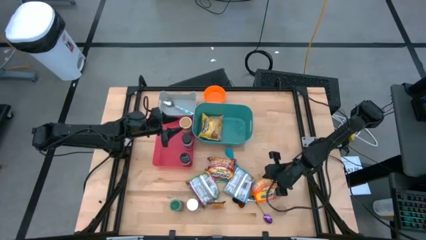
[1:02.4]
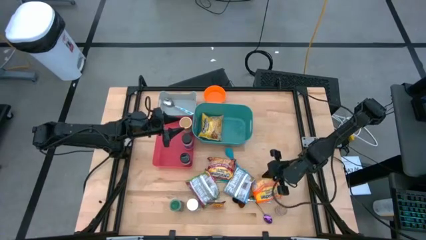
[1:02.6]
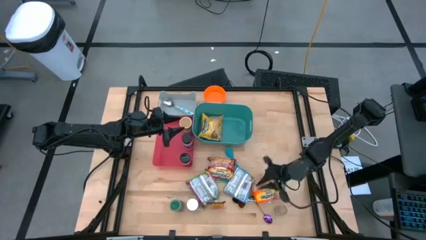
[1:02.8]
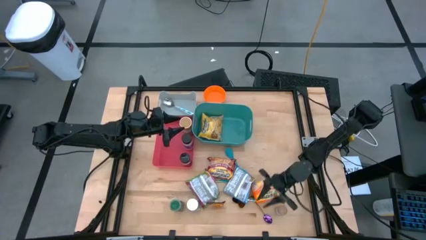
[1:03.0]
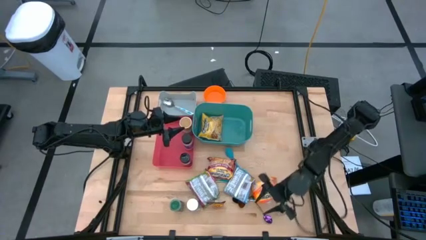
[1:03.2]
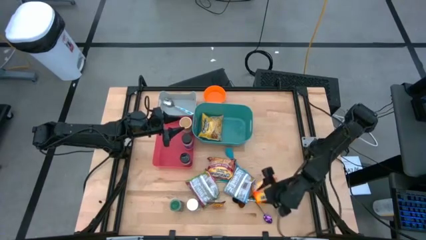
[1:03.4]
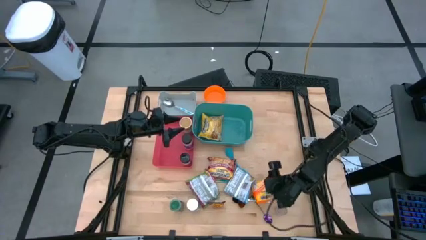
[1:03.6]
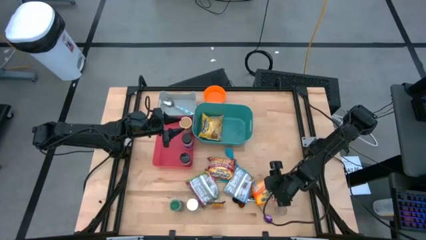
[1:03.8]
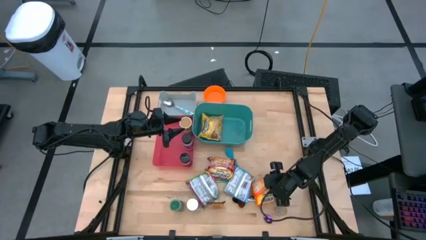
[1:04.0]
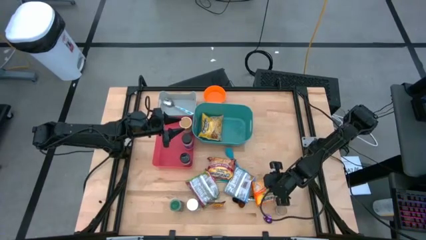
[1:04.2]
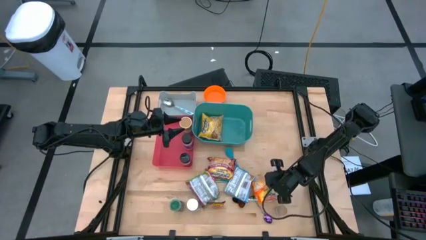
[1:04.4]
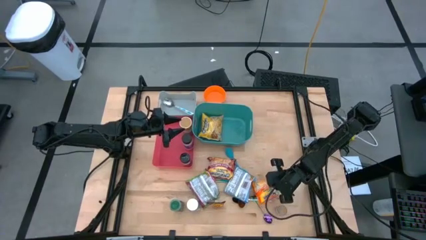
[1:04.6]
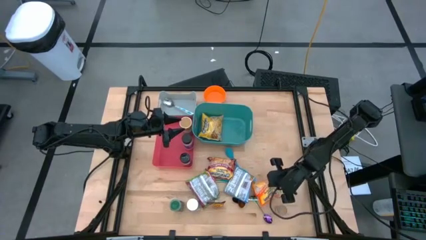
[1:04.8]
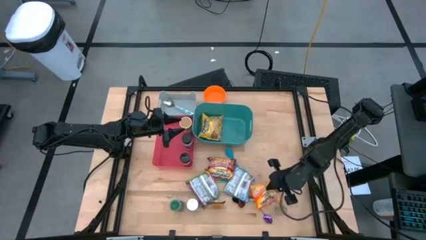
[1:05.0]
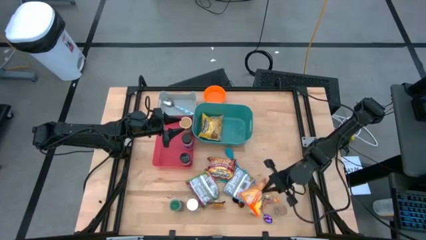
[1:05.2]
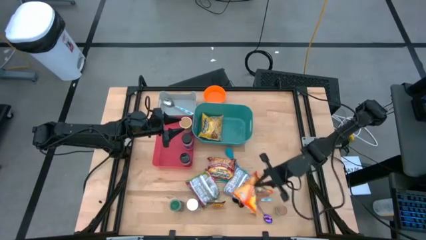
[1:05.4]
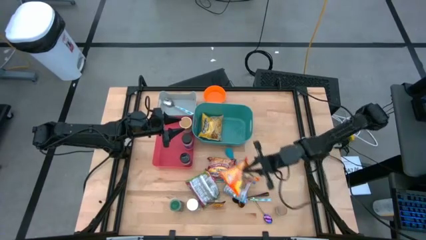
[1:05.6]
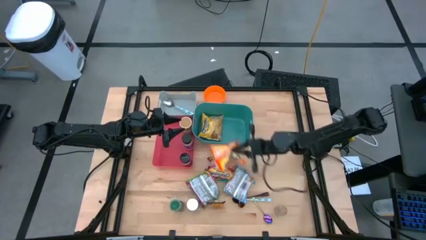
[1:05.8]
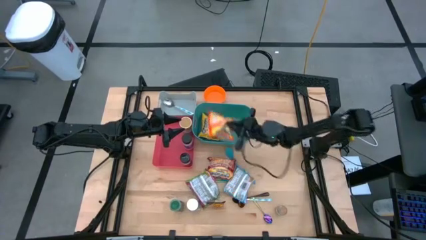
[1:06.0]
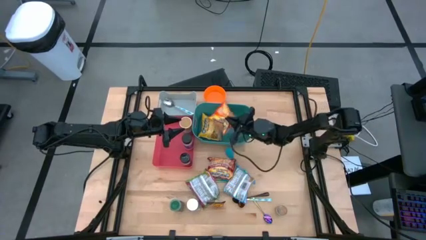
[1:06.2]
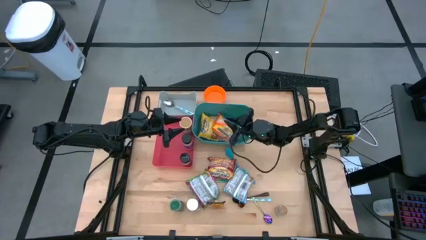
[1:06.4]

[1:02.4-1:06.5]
Task: Pick & Place Food Item
Put the orange noodle pack into the green bin

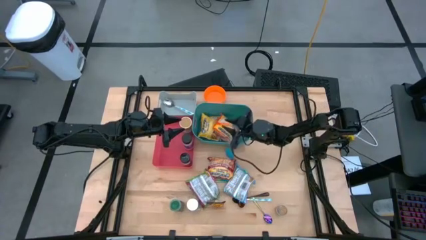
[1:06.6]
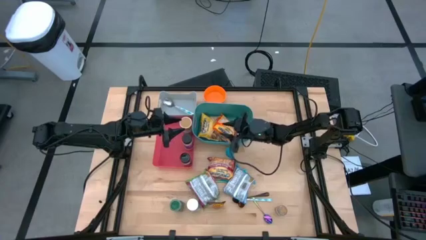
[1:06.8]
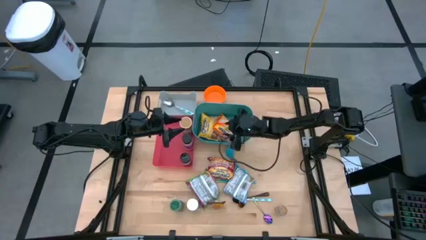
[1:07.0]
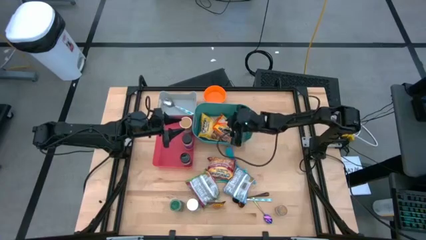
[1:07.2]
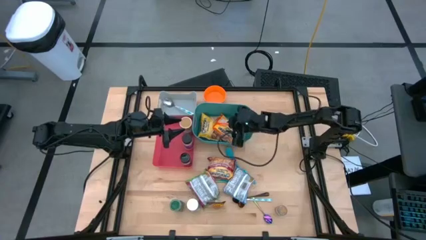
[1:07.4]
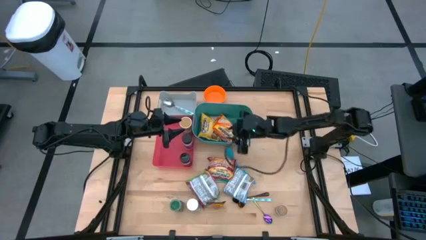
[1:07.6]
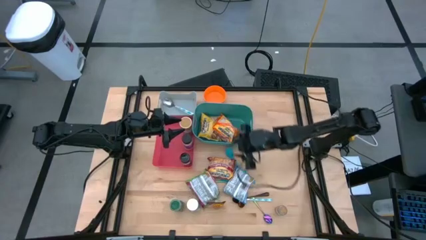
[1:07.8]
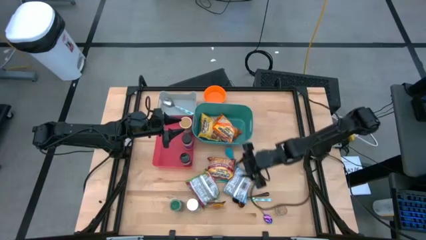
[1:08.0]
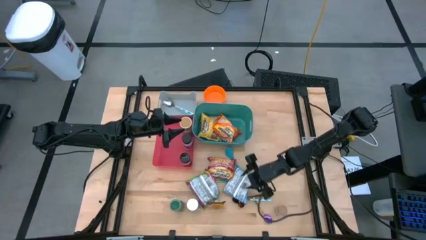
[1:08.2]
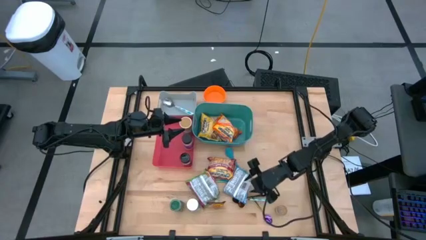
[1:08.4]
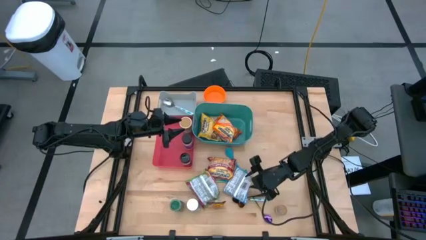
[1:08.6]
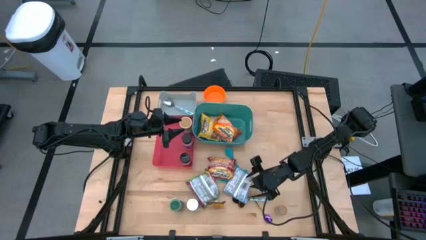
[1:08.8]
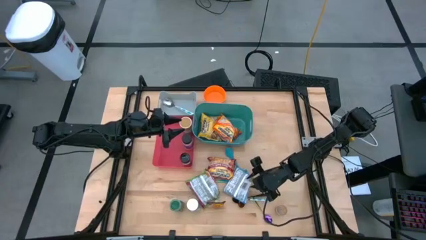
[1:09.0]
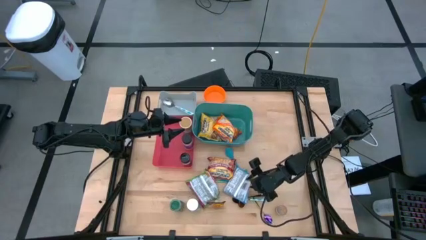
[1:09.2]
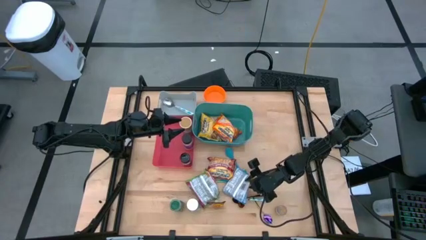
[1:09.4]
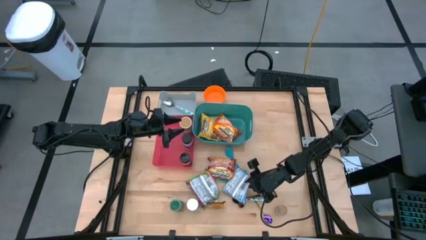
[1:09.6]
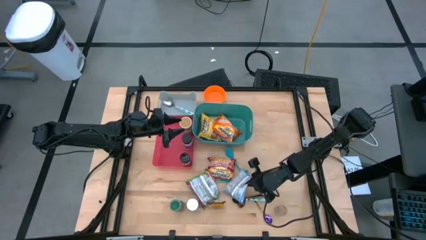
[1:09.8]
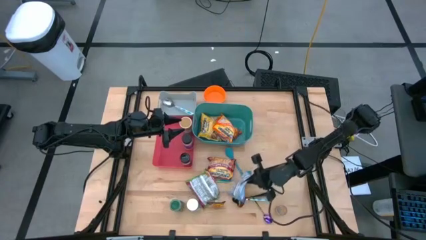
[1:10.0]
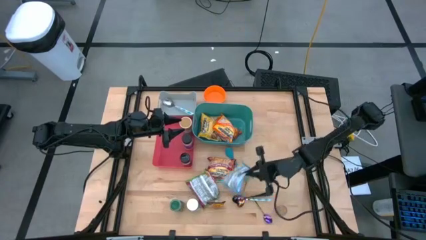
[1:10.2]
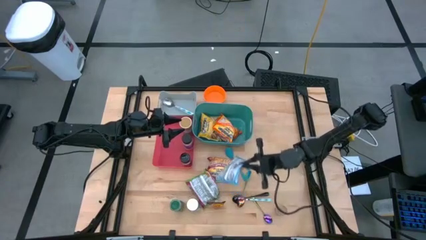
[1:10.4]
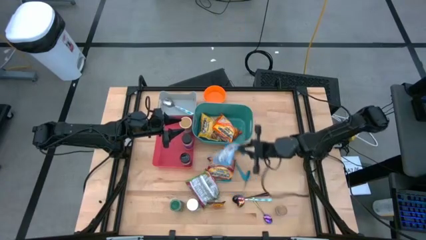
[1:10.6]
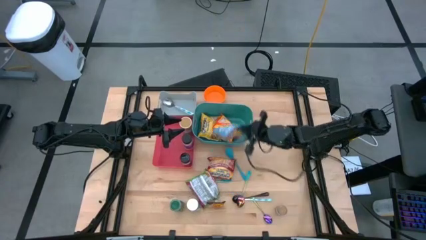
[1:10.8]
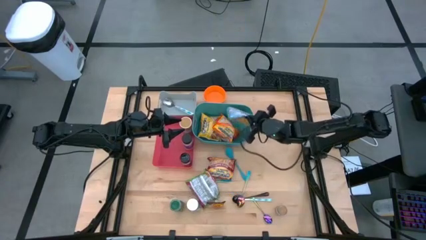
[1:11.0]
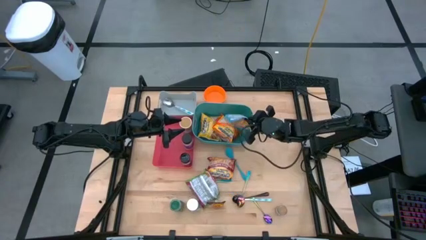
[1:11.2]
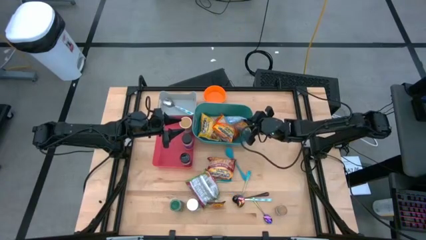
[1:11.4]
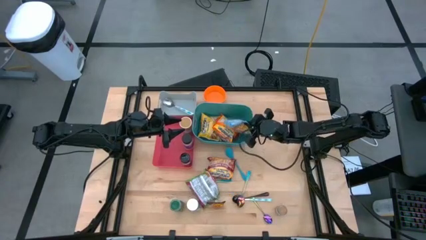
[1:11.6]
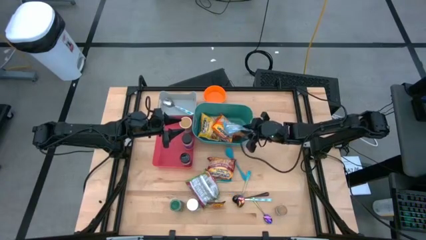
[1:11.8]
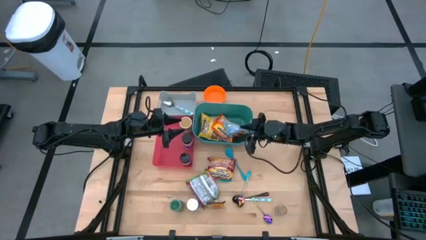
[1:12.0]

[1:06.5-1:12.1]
Put the light blue noodle pack into the green bin

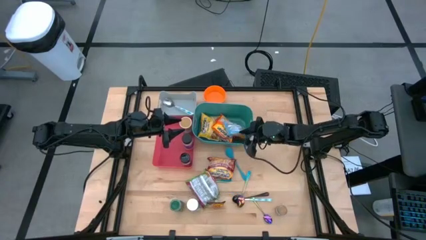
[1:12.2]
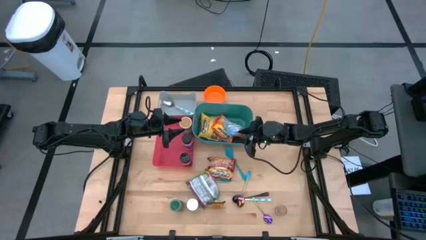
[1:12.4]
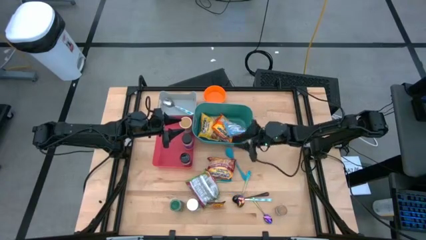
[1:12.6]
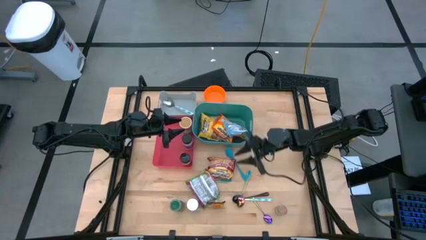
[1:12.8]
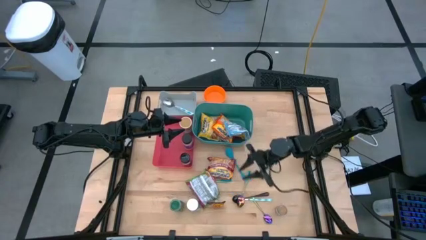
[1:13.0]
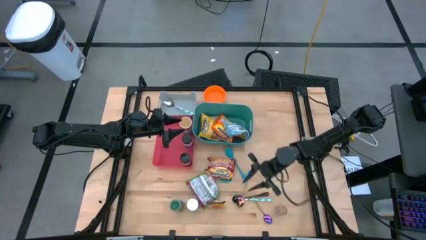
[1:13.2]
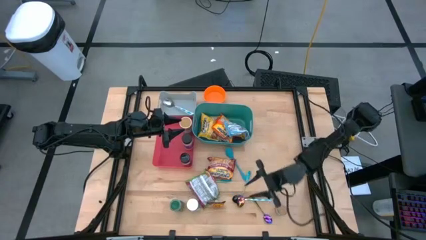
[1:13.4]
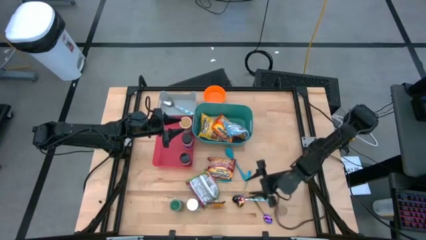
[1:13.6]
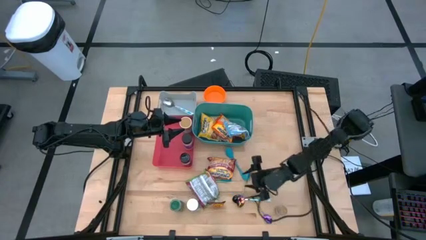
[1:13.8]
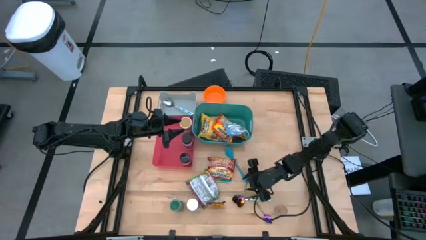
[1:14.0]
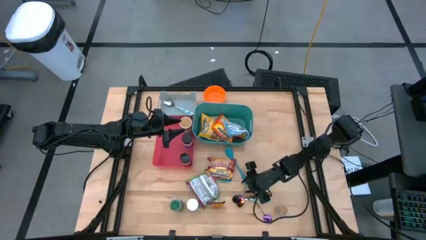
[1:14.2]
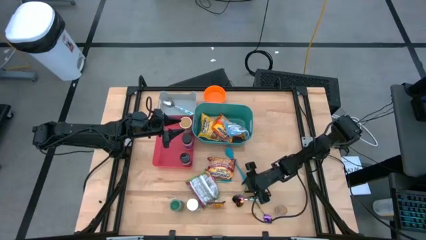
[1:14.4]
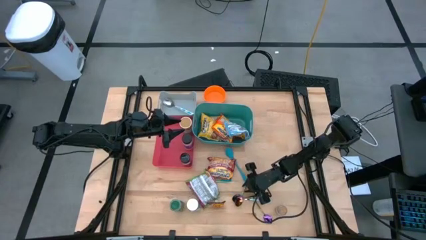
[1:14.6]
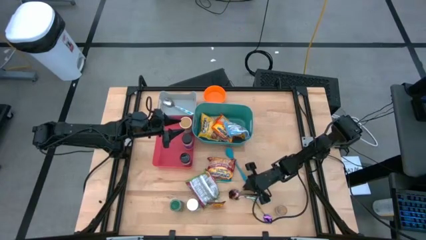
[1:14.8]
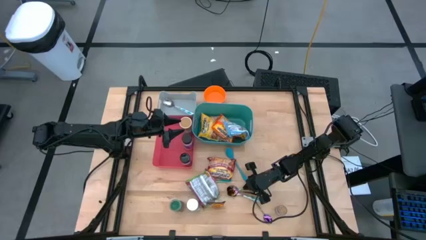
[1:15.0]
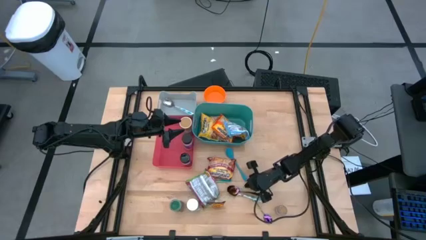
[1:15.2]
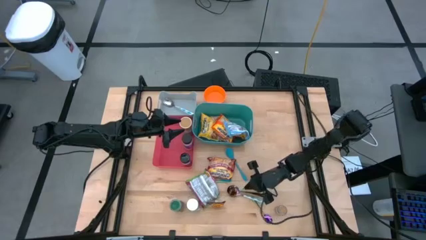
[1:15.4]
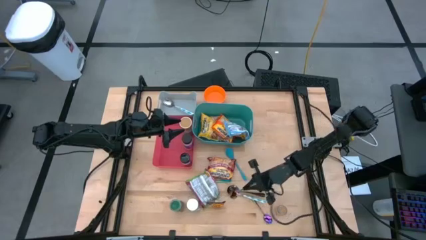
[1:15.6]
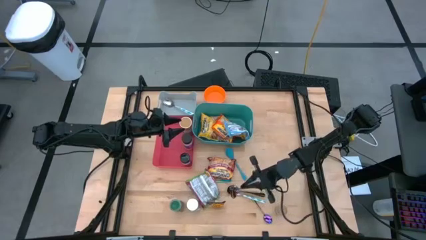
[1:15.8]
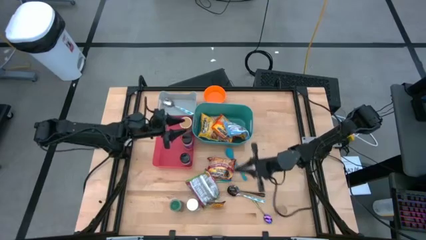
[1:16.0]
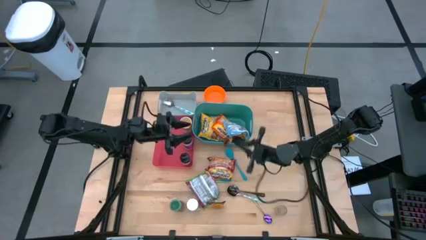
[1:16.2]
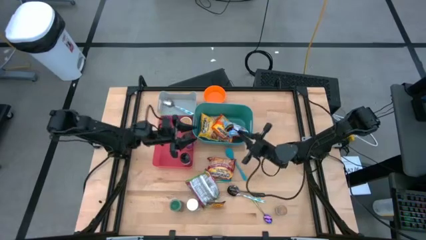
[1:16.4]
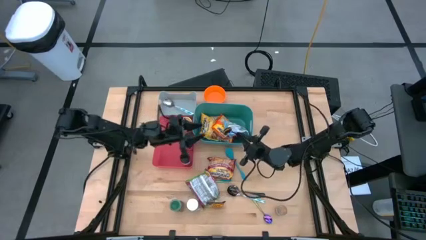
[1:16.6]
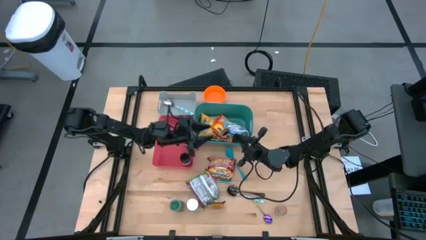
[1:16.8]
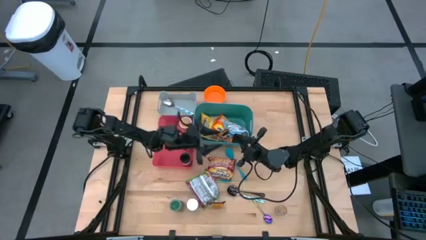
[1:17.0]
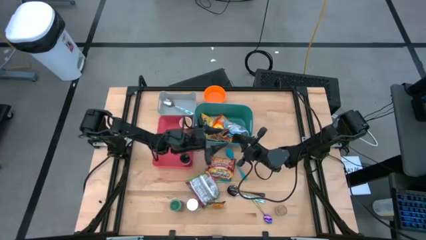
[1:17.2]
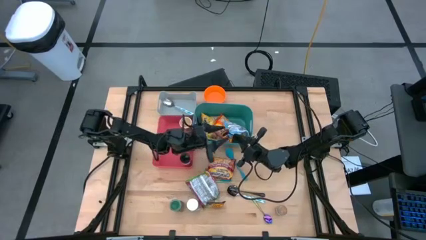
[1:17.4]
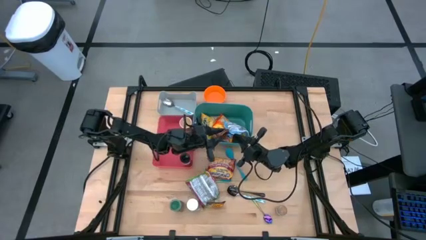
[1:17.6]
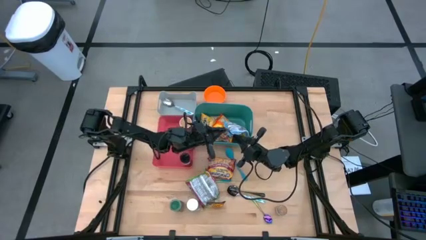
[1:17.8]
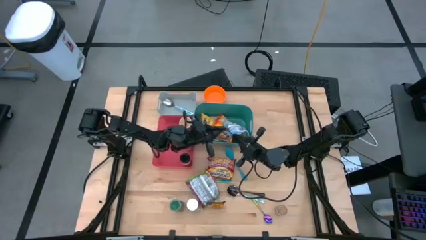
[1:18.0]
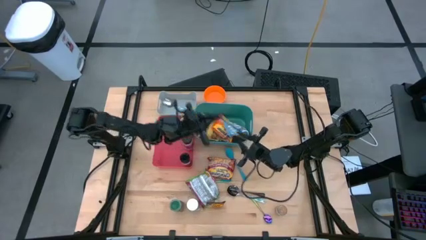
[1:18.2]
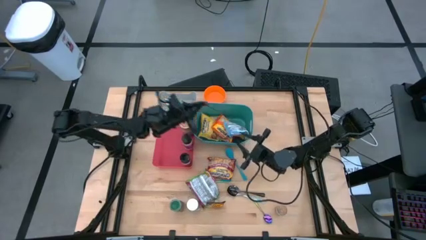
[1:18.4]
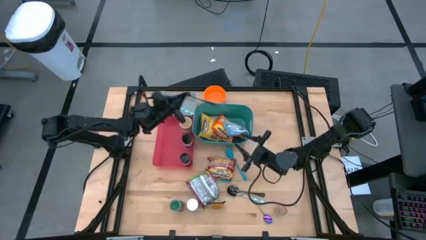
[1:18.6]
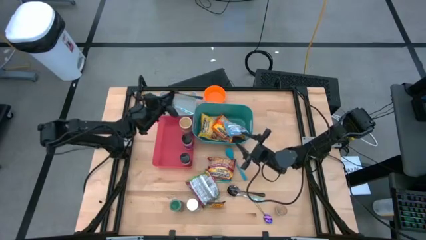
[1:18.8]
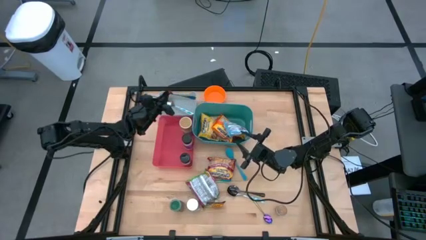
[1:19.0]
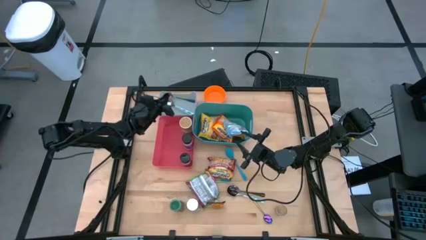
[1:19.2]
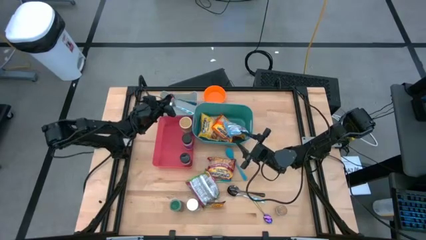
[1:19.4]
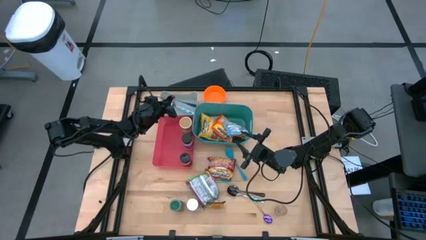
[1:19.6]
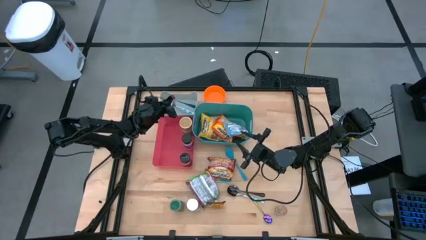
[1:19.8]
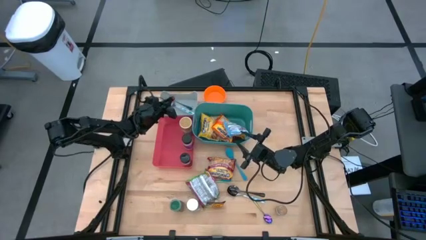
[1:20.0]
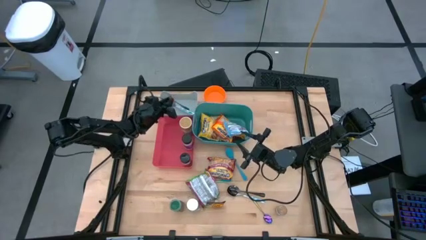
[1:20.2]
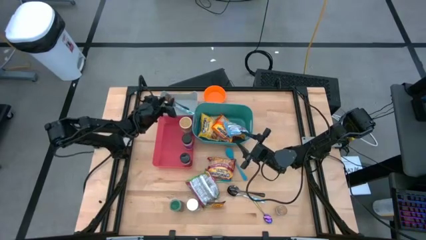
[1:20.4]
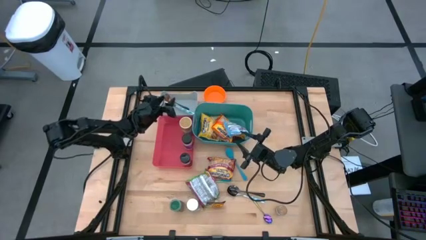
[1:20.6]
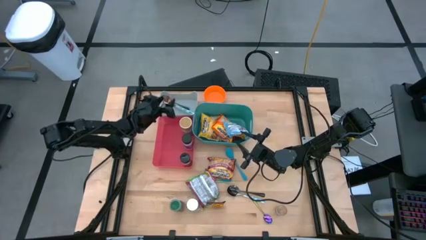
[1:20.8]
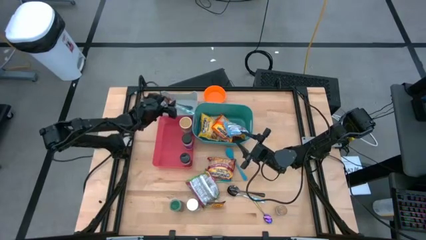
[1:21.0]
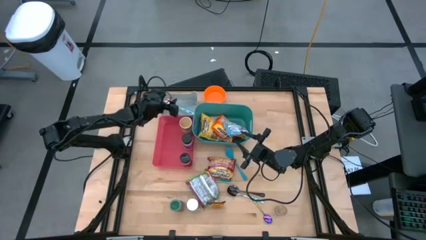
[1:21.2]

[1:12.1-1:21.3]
Put the top violet spoon into the gray bin
